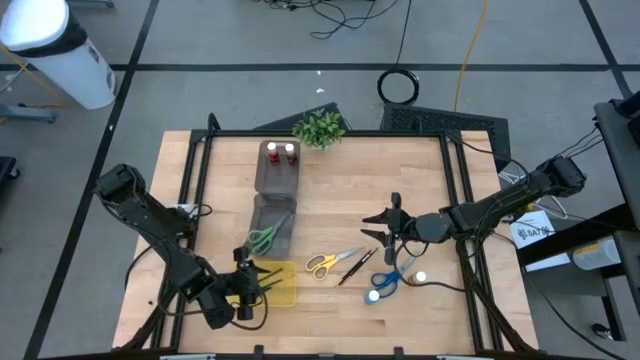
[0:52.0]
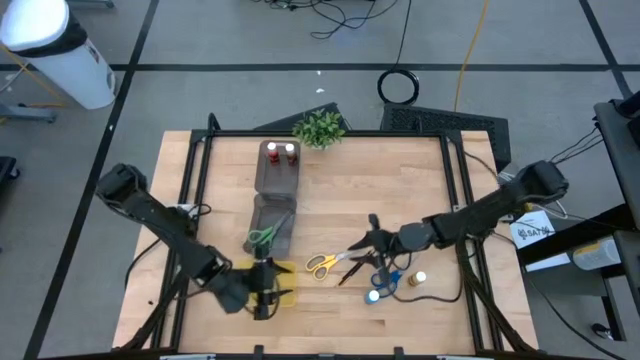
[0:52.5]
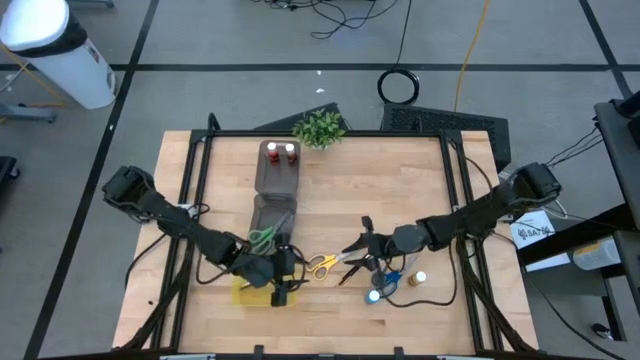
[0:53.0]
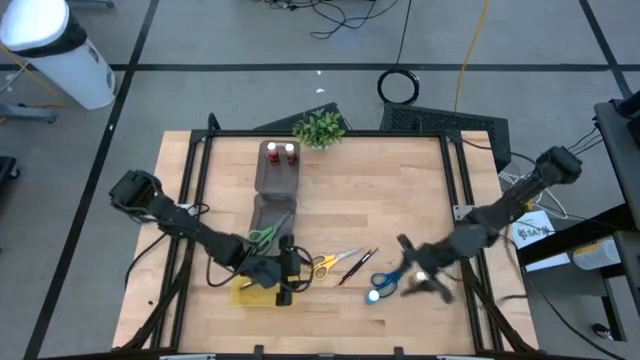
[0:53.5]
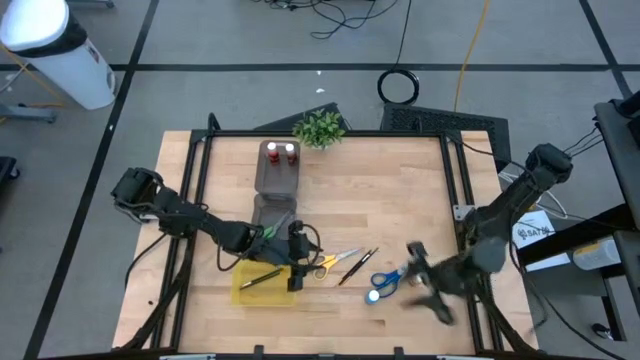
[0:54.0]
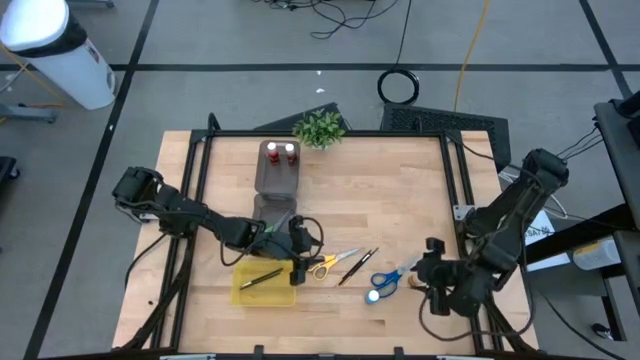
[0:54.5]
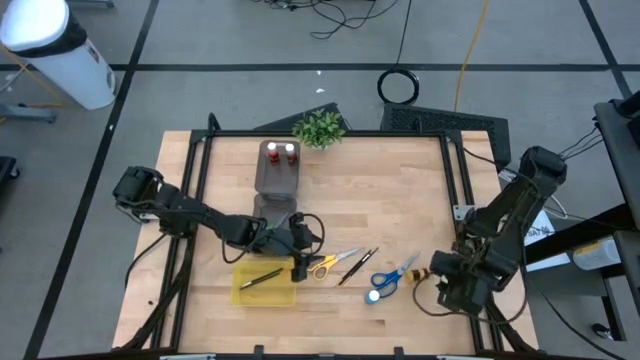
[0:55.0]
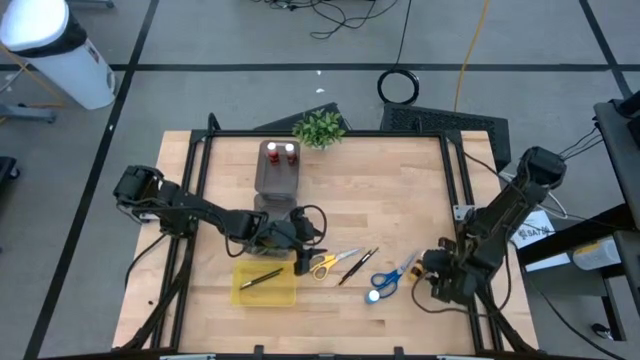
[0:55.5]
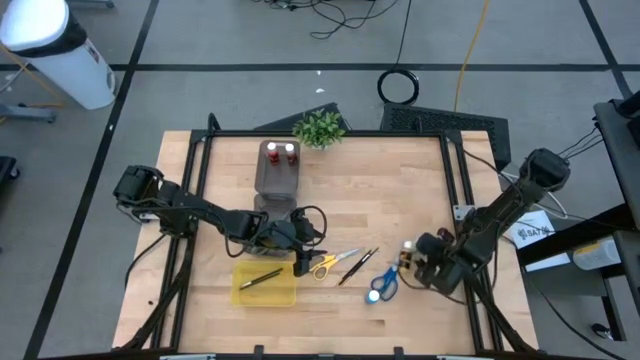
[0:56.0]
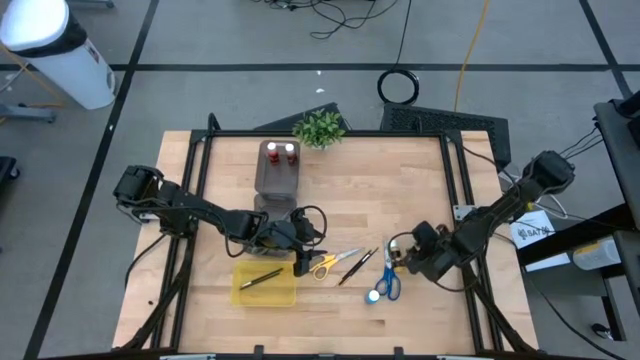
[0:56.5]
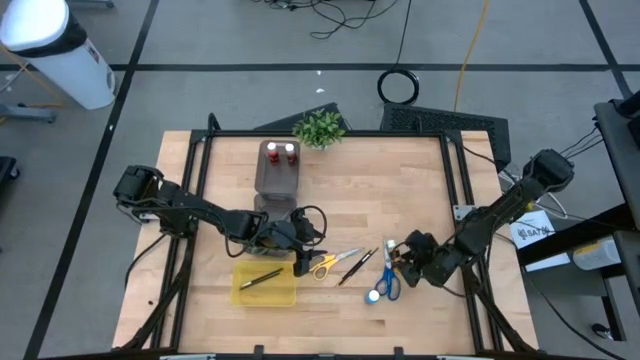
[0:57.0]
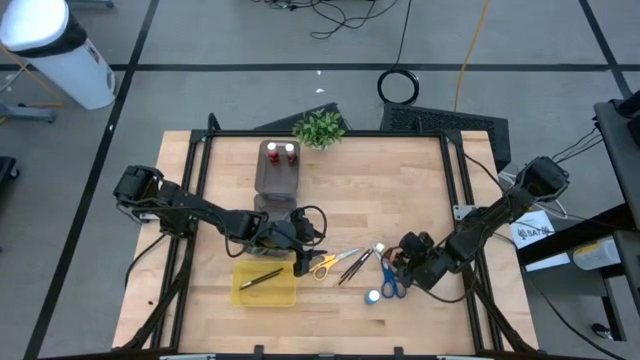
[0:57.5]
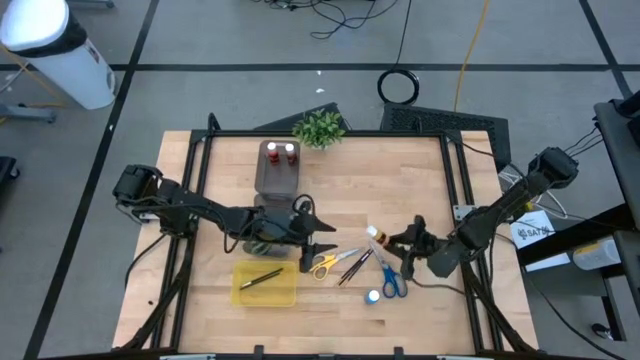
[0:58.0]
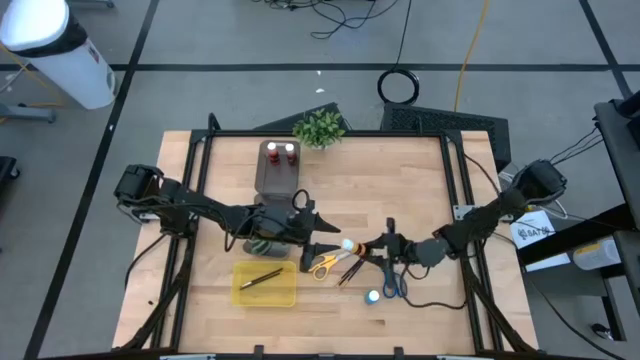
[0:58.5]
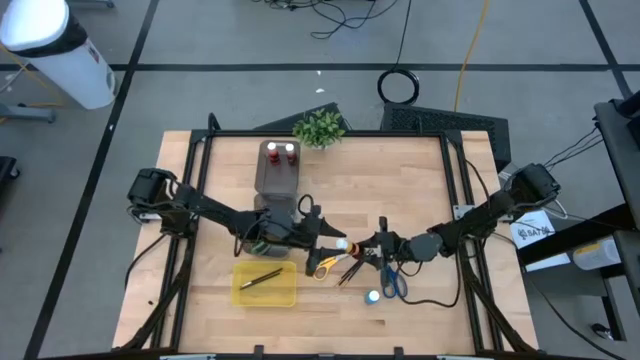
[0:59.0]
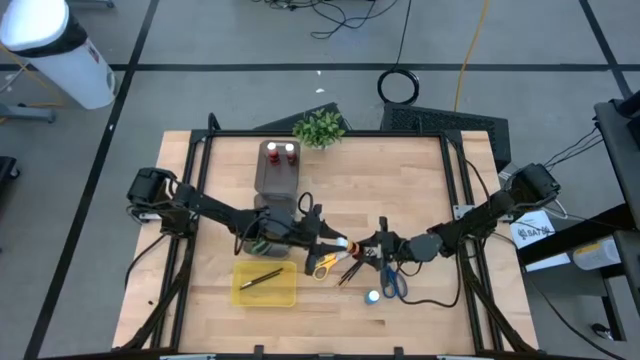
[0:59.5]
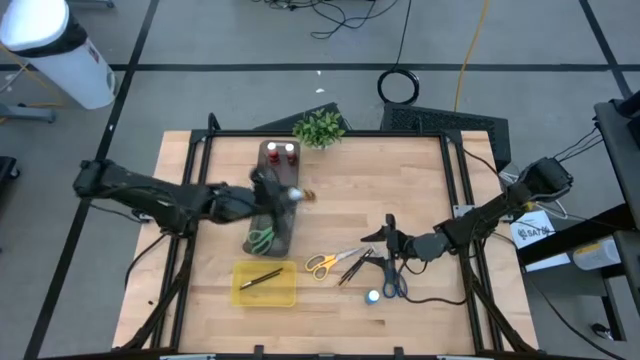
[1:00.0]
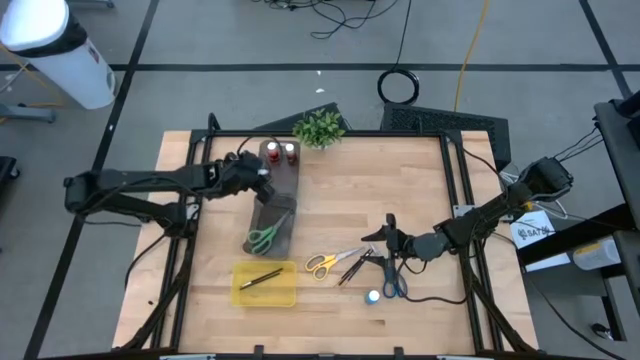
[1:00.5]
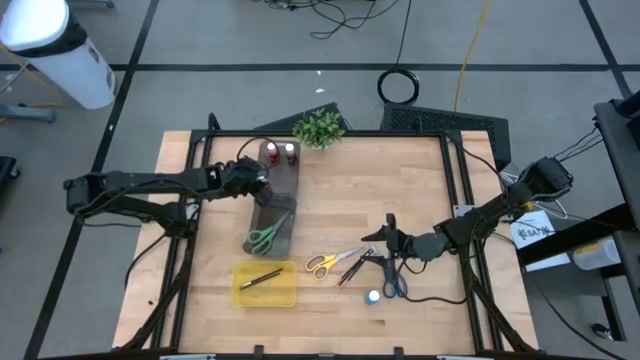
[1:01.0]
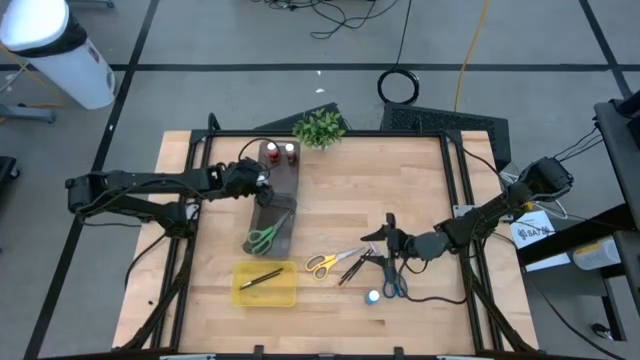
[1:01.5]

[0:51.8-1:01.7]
Task: Pick & Place Paint Supplies
Put the yellow paint bottle into the top black bin

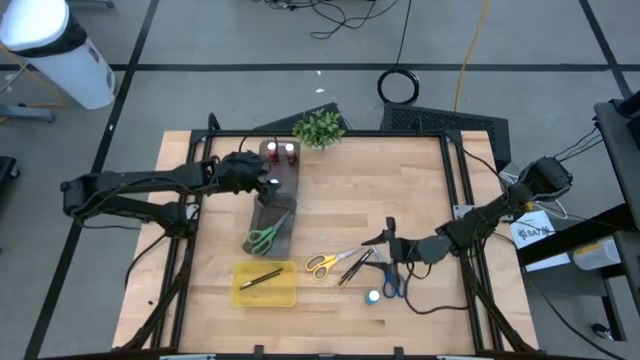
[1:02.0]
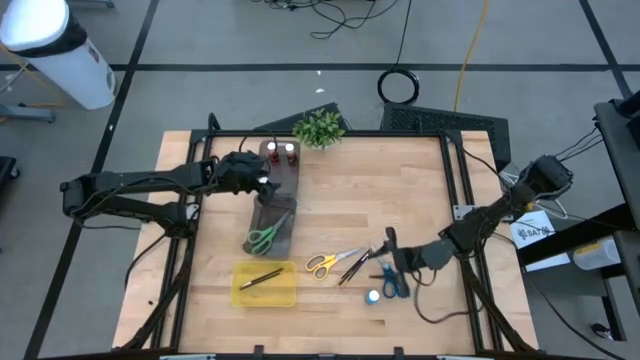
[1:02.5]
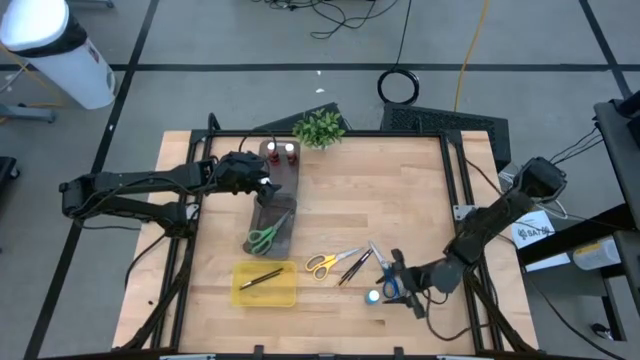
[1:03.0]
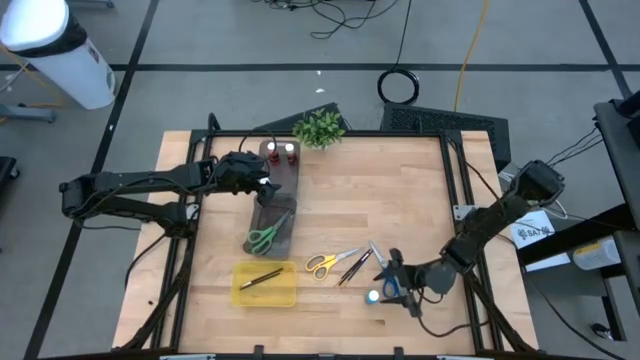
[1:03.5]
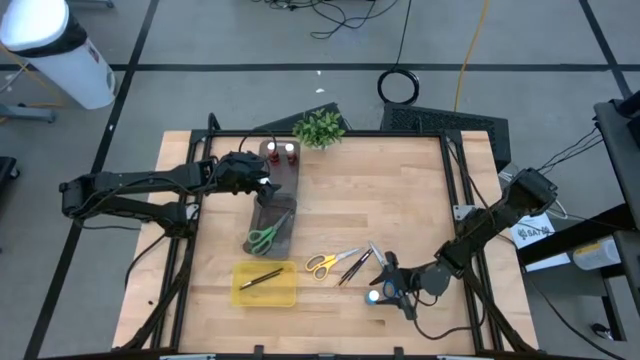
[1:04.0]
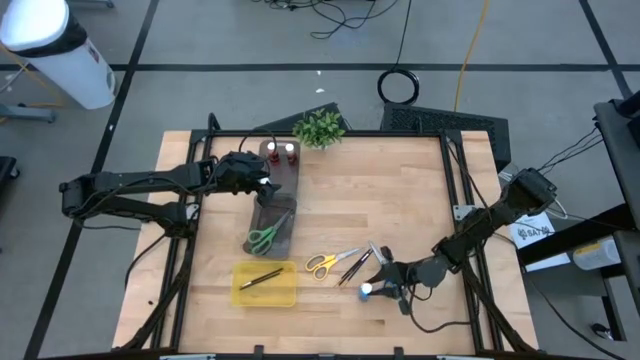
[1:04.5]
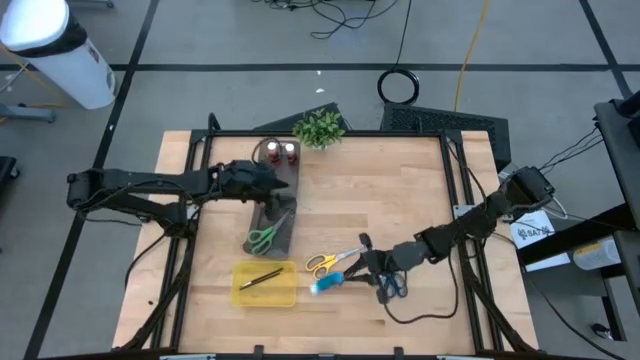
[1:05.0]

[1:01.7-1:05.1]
Put the blue paint bottle into the top black bin

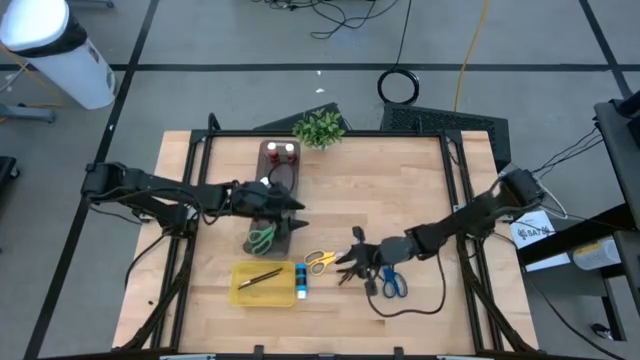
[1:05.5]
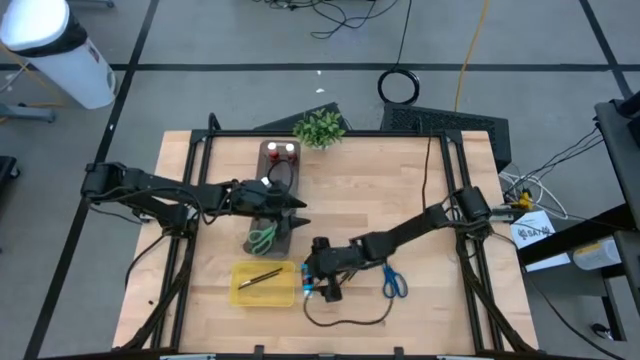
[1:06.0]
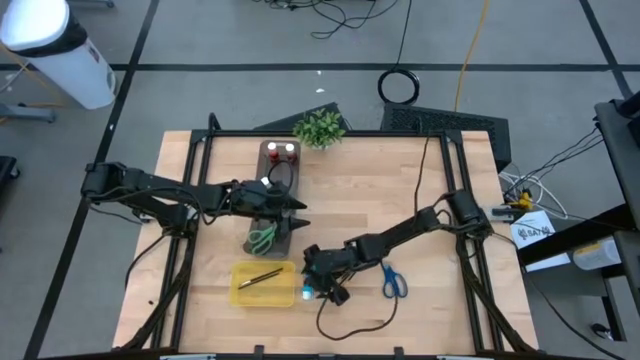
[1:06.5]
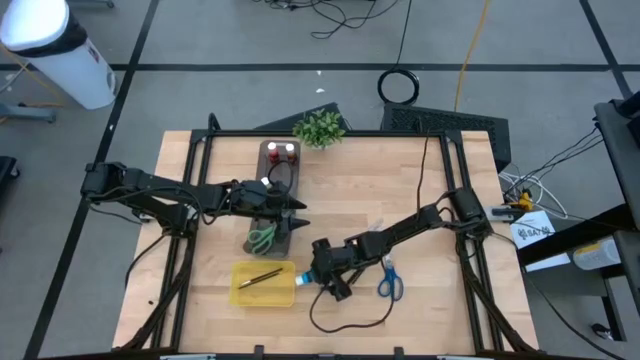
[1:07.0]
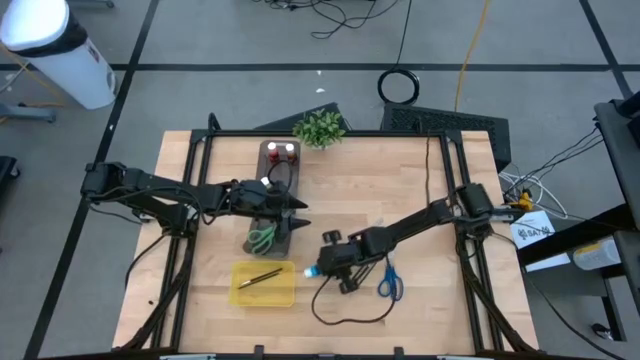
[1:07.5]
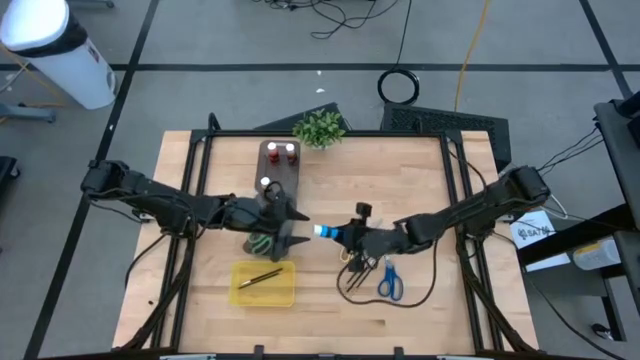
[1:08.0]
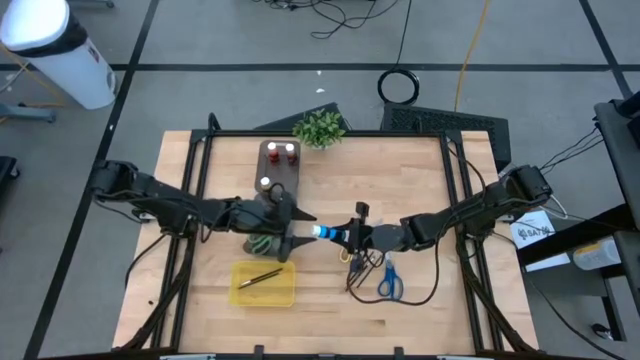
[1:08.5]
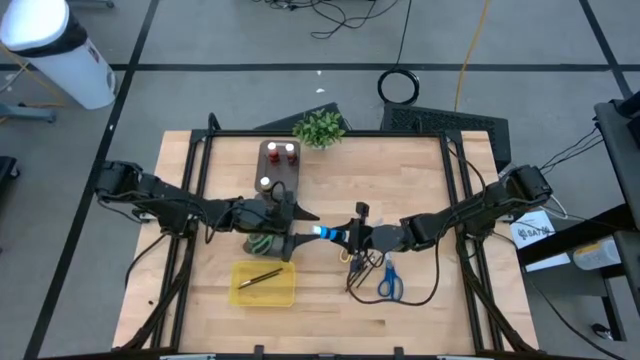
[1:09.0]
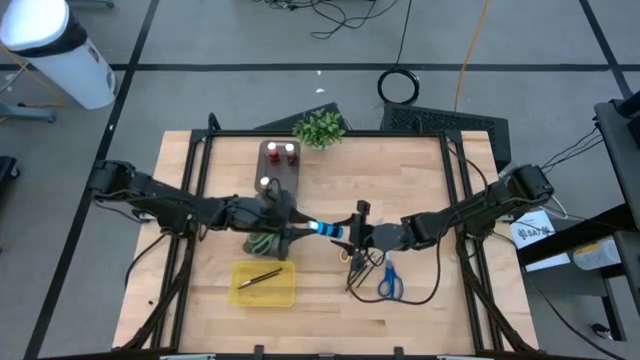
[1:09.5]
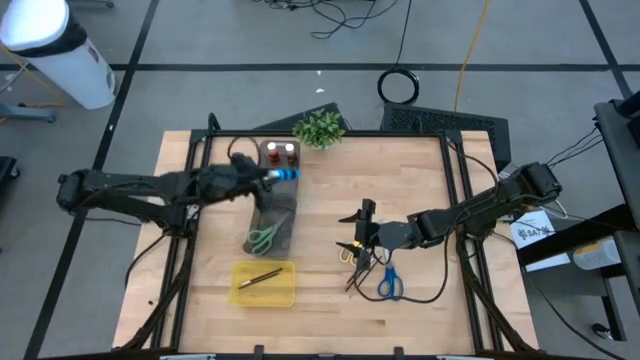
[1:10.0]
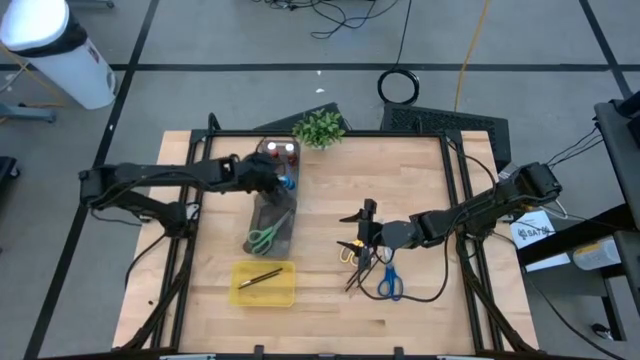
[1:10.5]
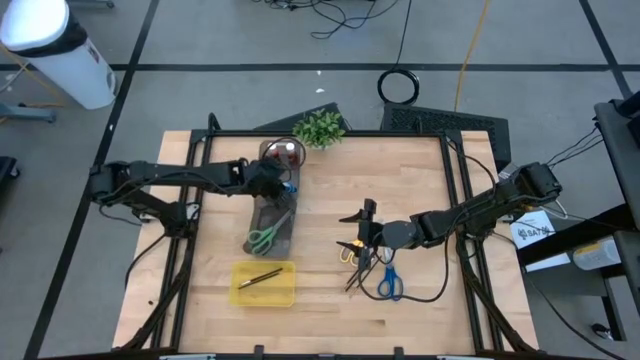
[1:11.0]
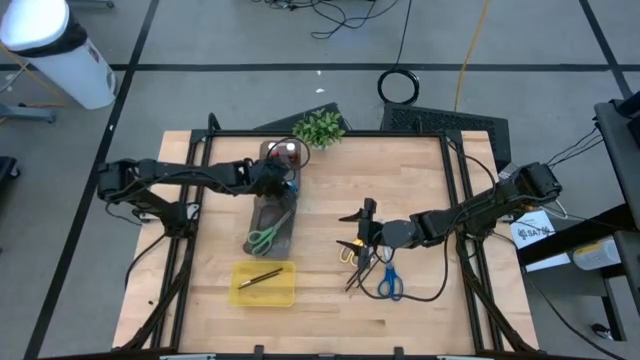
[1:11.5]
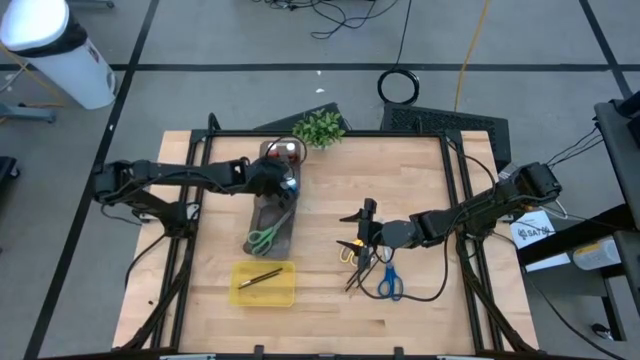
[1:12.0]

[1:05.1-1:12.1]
Put the blue paint bottle into the top black bin

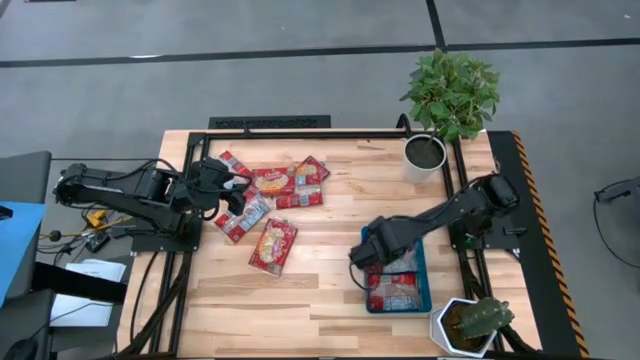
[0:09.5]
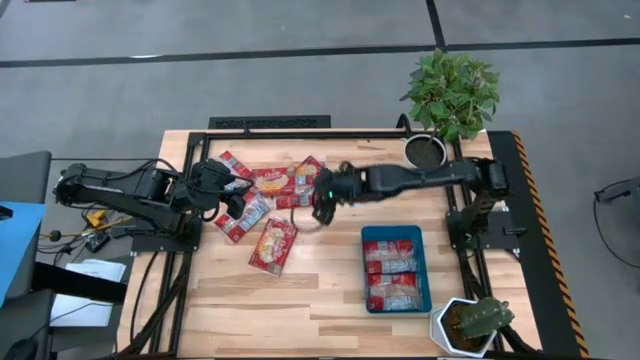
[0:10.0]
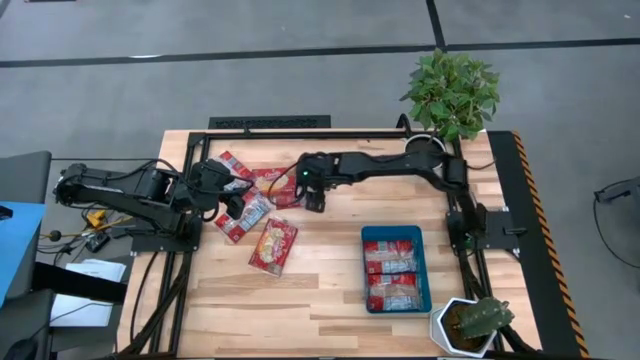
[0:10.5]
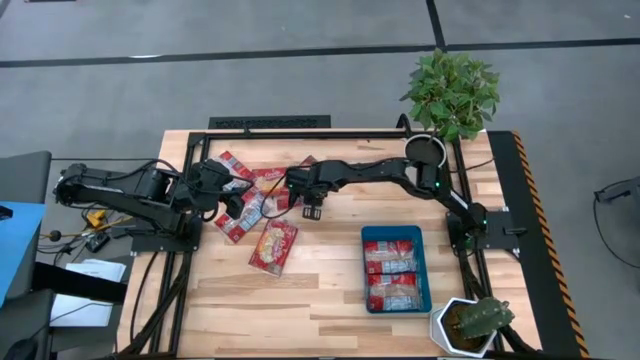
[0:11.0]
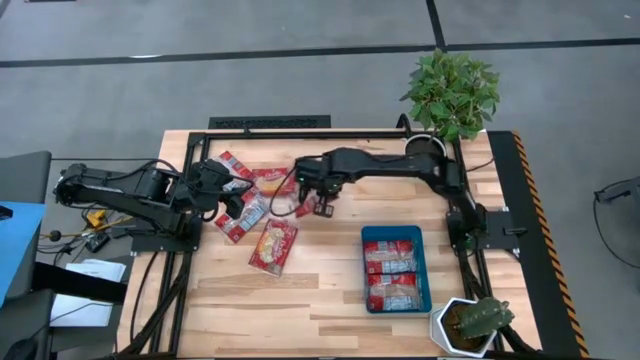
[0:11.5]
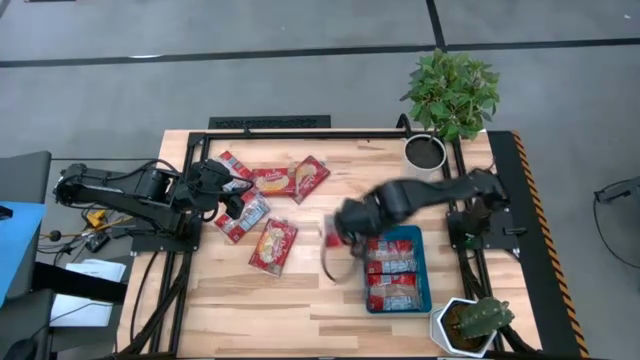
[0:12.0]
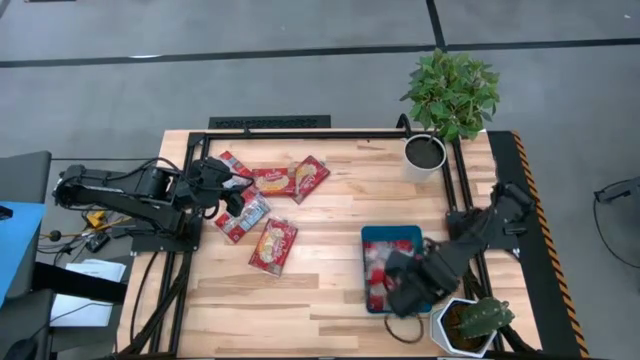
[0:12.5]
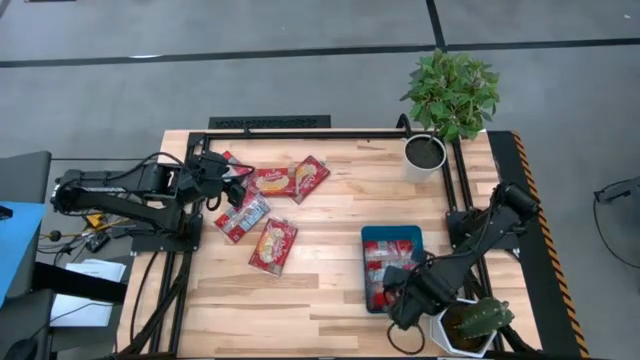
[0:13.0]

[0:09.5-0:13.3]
Task: Sort popcorn bags into baskets
Put the red popcorn bag into the blue bin
